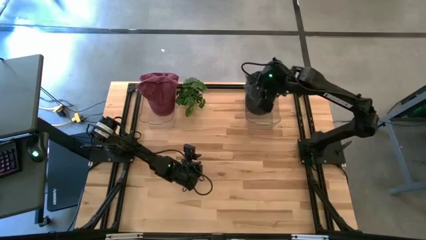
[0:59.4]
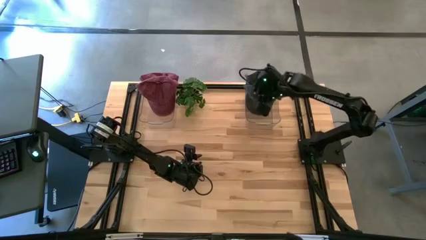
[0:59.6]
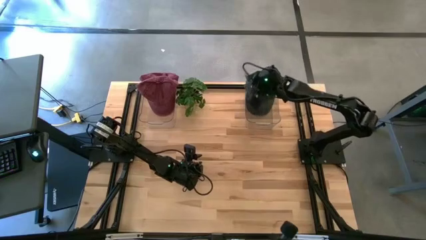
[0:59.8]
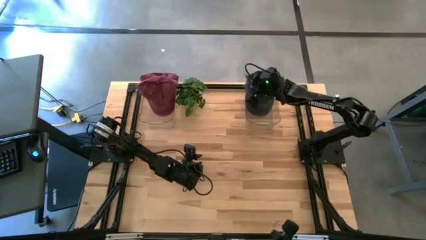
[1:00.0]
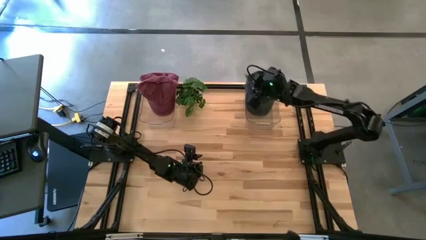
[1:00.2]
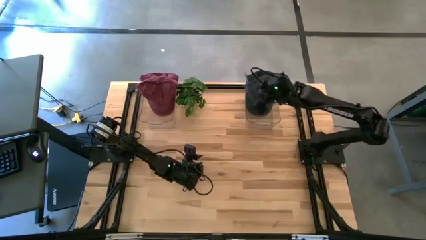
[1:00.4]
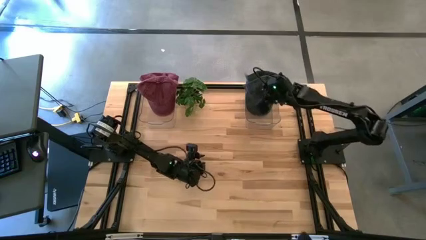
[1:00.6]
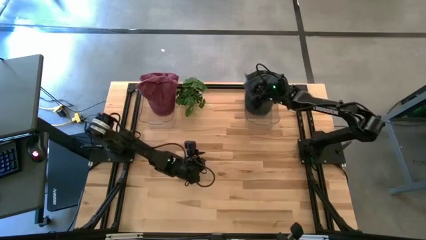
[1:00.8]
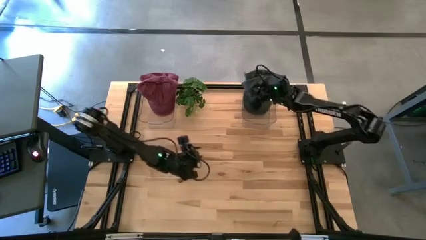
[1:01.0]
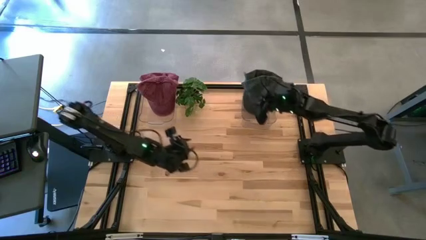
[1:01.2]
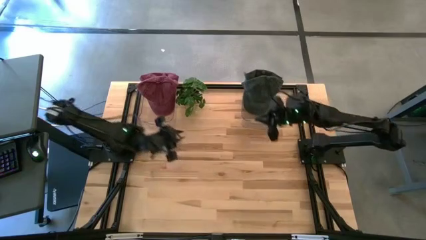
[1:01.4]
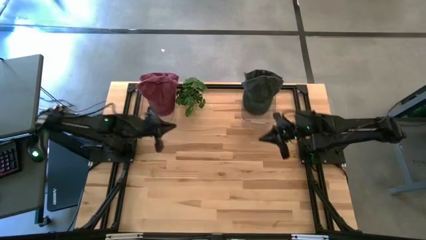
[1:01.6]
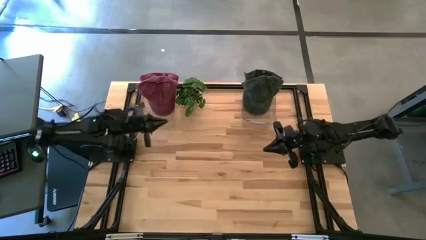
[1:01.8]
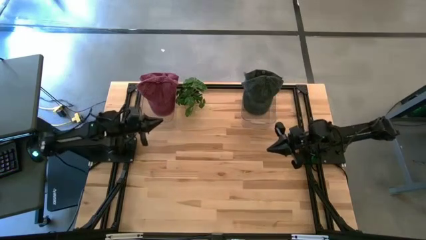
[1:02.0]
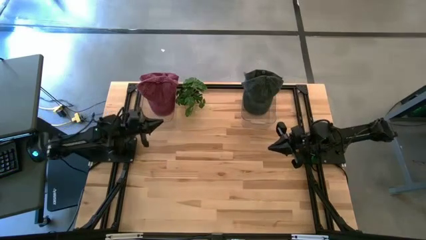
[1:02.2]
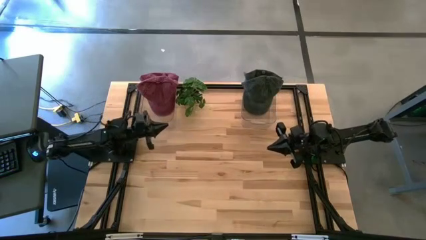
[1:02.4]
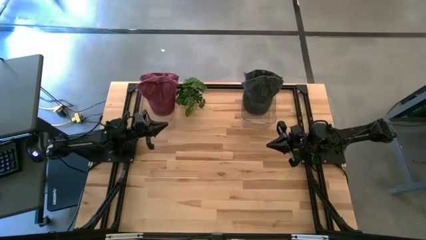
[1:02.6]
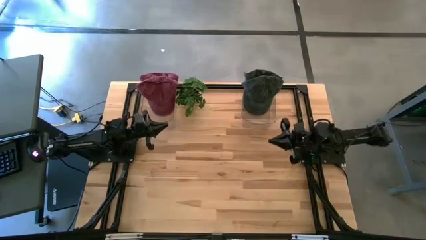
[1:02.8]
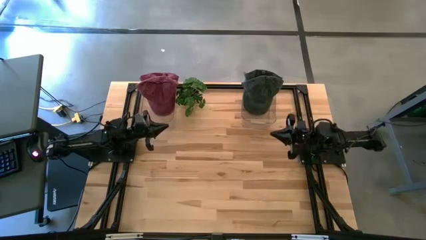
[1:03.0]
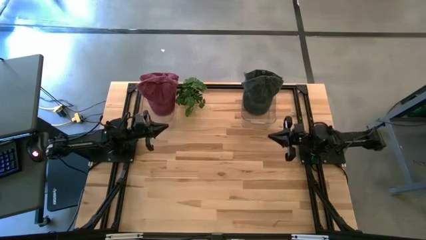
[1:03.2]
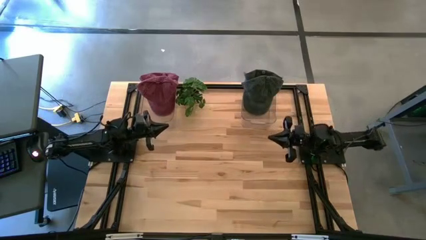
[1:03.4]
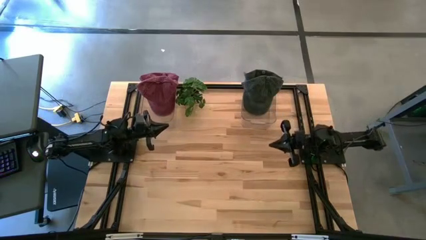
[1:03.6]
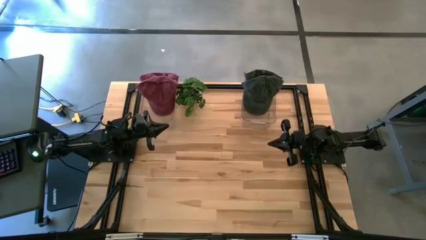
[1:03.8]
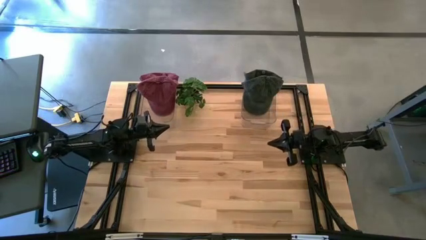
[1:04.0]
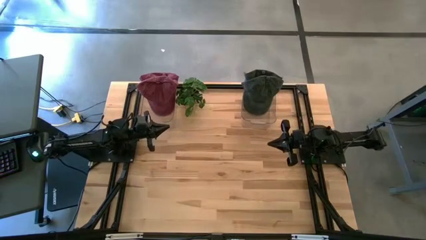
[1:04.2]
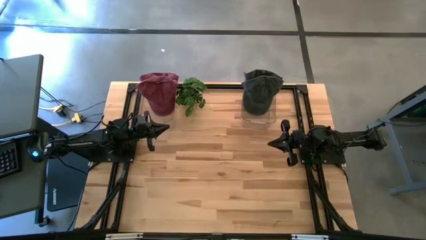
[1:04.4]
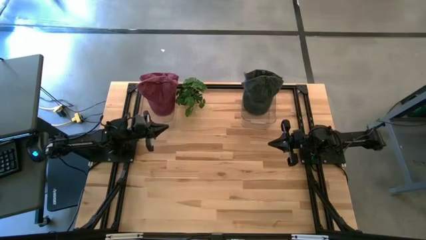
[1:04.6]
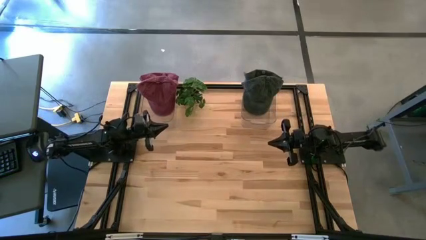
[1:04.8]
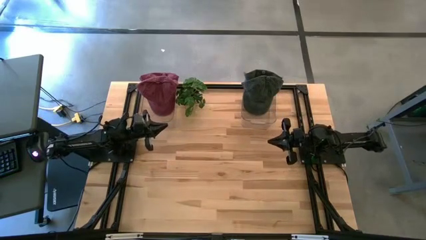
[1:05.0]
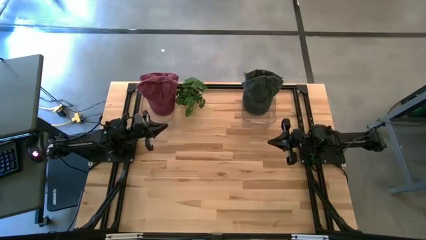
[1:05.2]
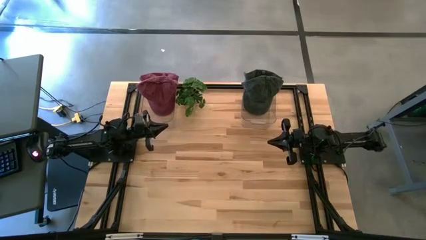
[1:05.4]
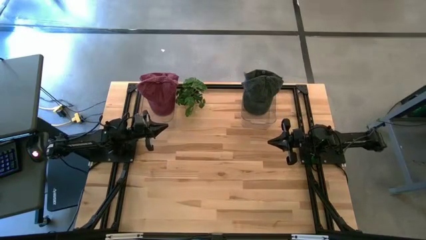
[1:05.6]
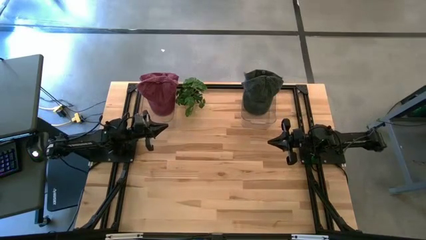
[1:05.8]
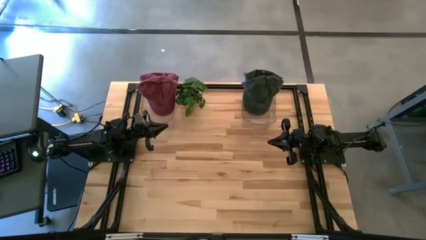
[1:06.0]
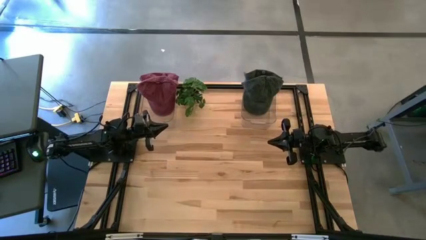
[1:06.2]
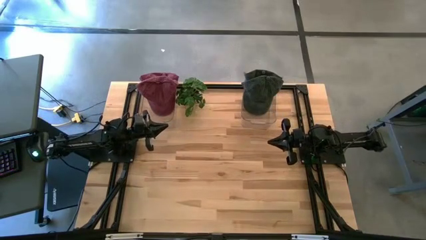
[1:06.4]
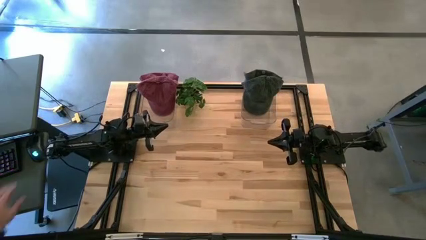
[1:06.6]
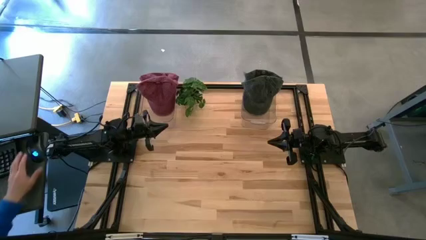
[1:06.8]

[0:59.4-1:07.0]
Task: Pick & Place hat
Return to home position

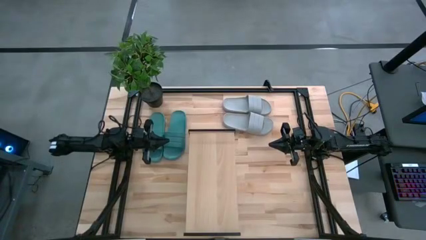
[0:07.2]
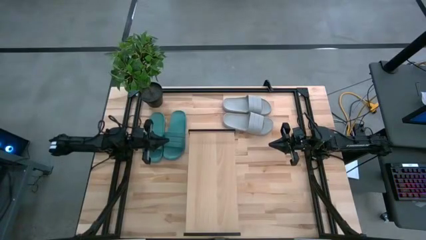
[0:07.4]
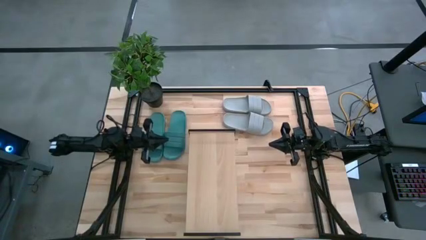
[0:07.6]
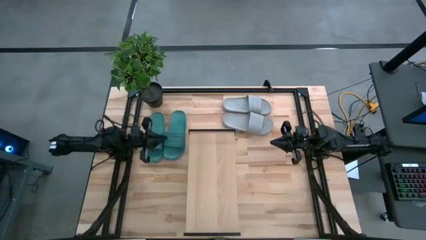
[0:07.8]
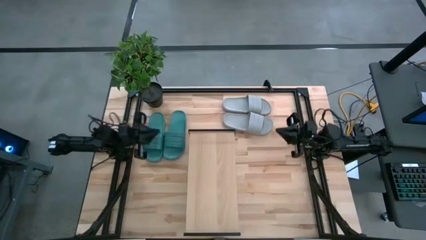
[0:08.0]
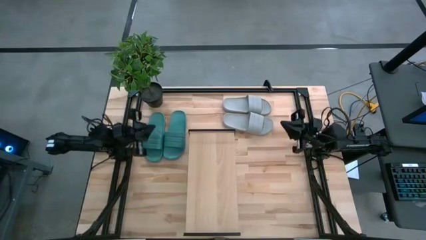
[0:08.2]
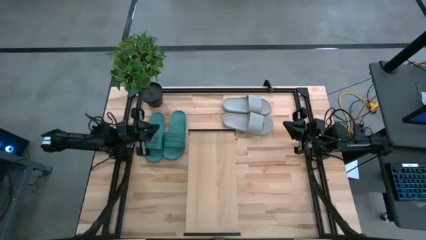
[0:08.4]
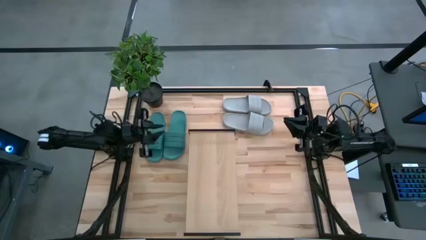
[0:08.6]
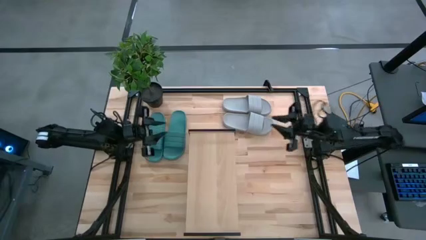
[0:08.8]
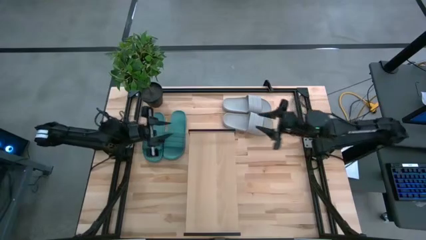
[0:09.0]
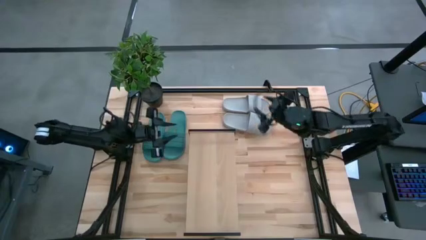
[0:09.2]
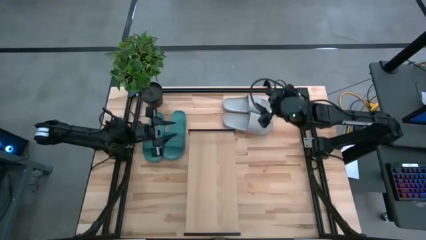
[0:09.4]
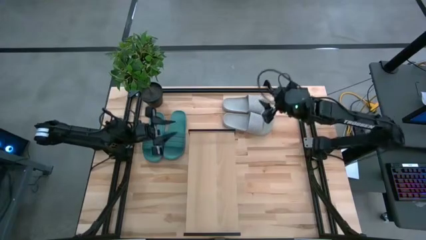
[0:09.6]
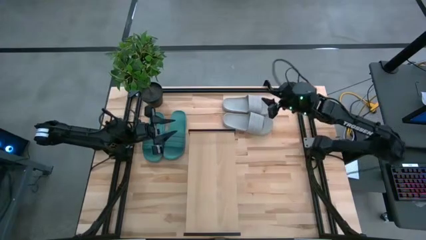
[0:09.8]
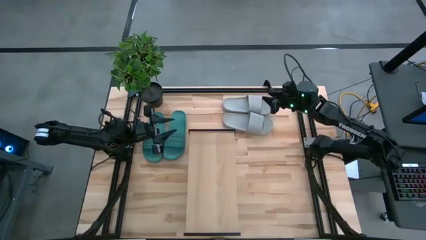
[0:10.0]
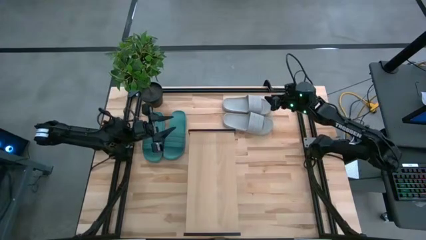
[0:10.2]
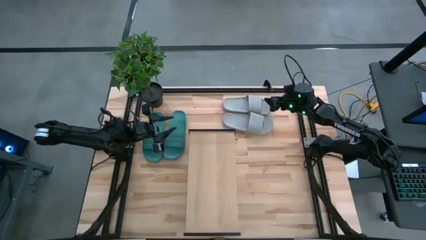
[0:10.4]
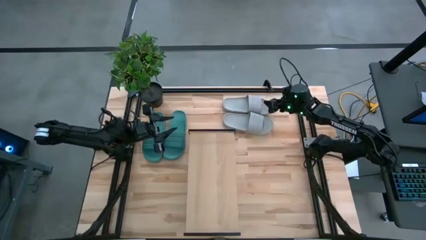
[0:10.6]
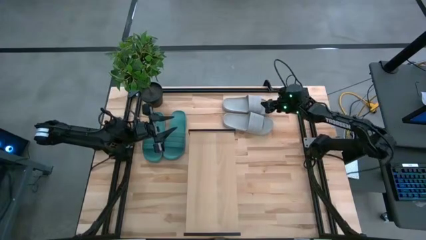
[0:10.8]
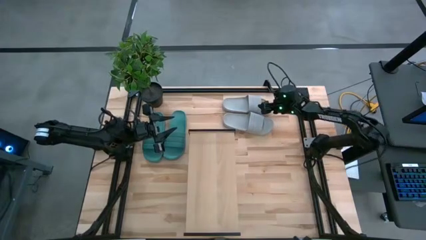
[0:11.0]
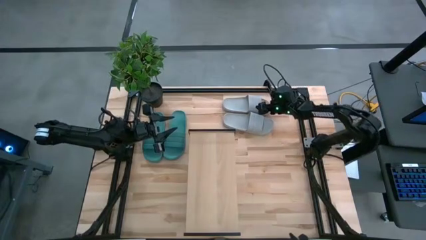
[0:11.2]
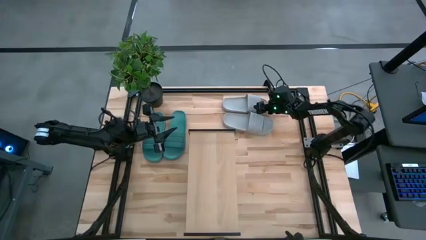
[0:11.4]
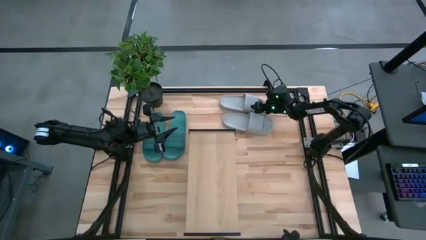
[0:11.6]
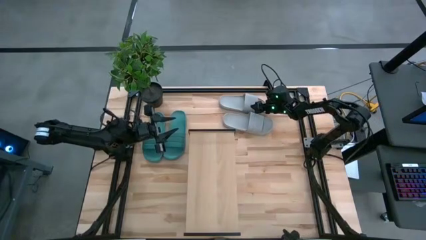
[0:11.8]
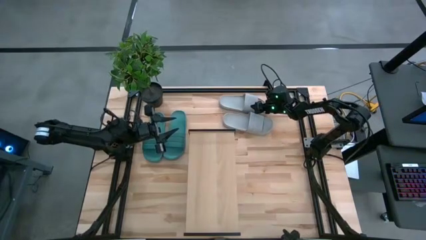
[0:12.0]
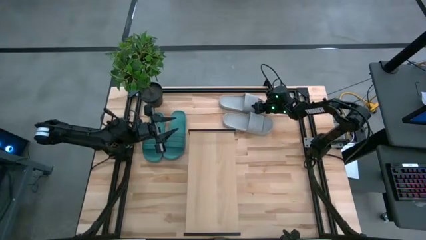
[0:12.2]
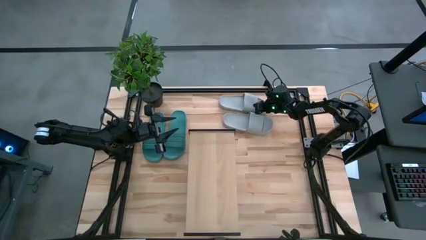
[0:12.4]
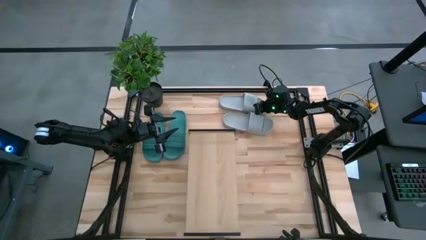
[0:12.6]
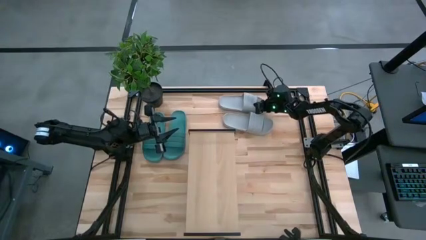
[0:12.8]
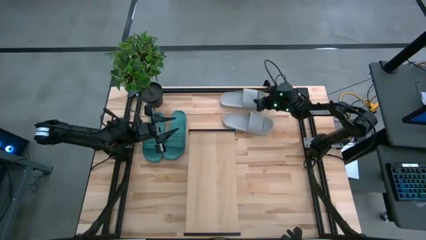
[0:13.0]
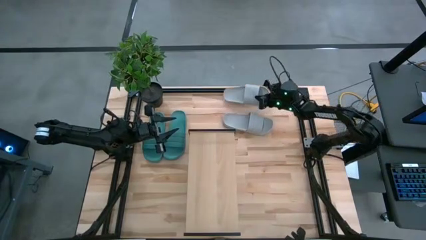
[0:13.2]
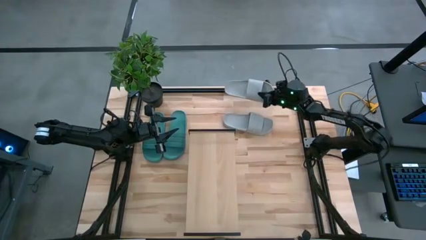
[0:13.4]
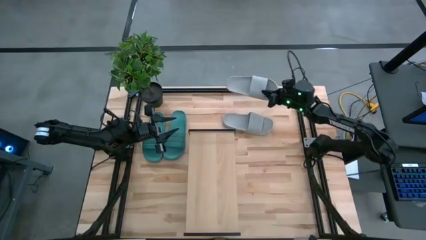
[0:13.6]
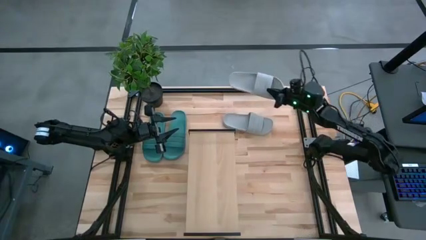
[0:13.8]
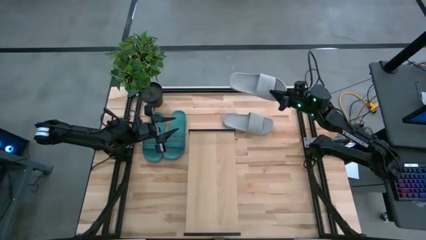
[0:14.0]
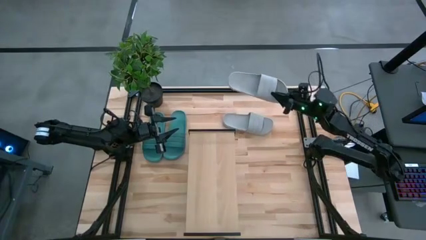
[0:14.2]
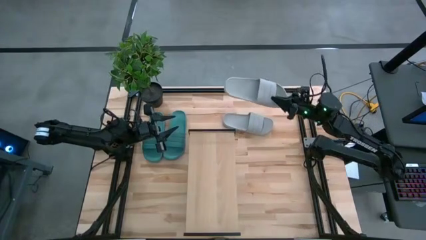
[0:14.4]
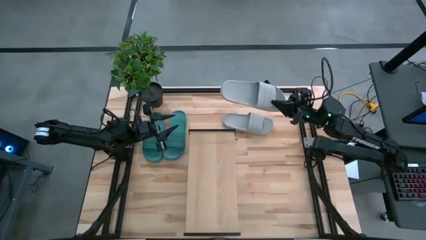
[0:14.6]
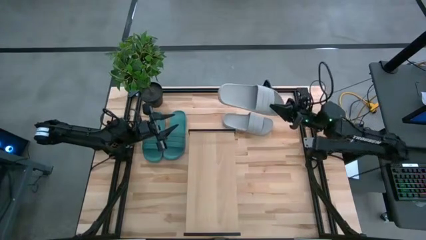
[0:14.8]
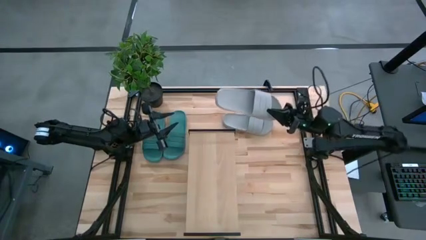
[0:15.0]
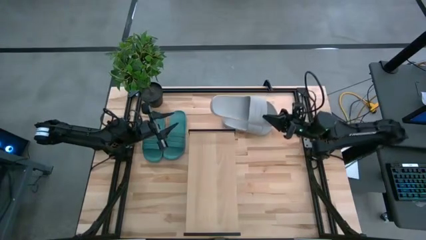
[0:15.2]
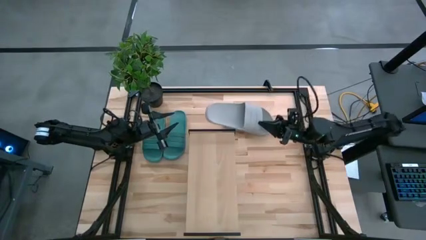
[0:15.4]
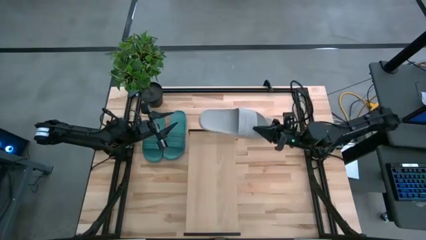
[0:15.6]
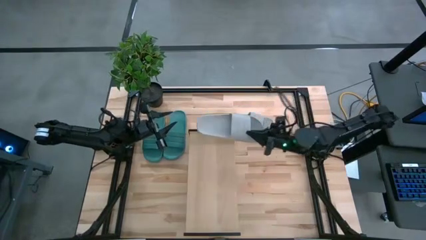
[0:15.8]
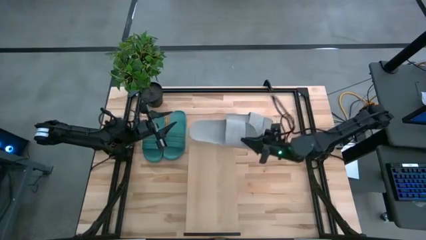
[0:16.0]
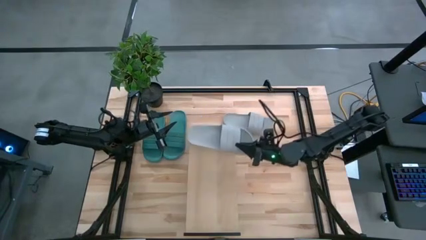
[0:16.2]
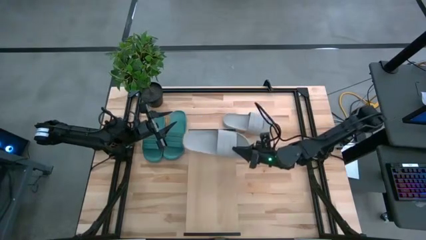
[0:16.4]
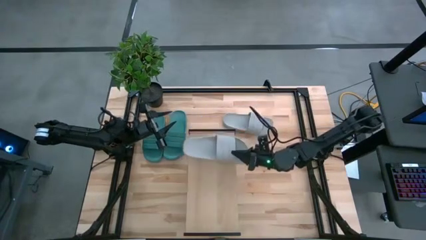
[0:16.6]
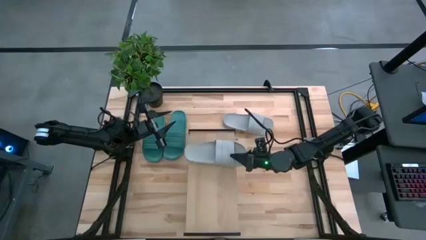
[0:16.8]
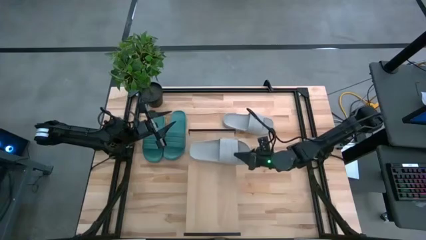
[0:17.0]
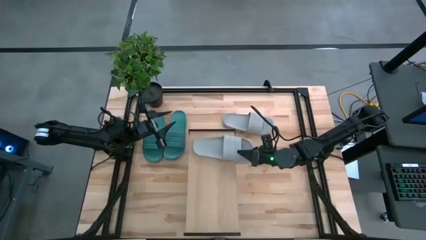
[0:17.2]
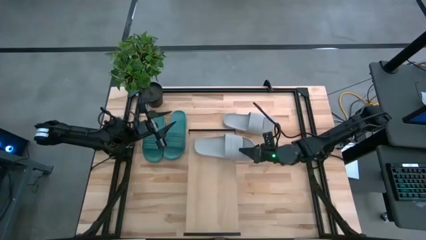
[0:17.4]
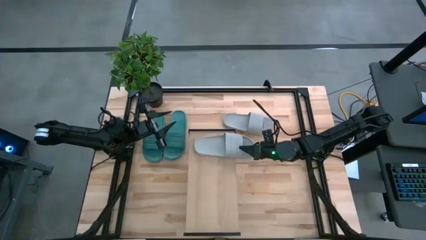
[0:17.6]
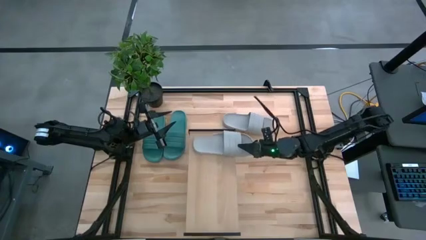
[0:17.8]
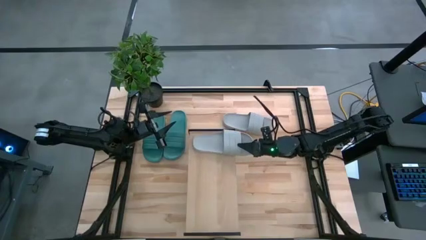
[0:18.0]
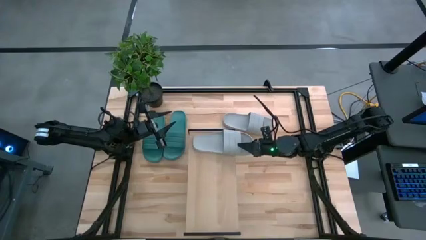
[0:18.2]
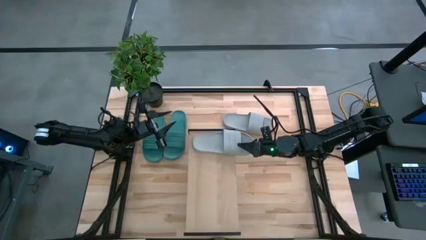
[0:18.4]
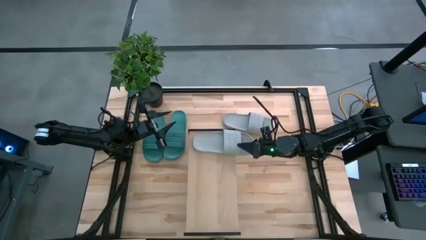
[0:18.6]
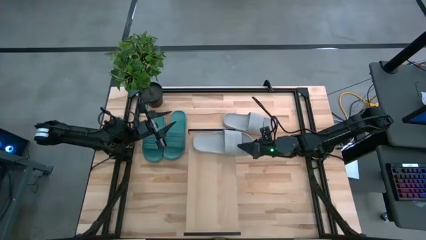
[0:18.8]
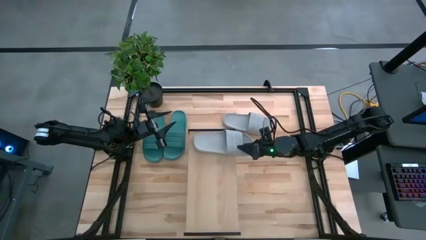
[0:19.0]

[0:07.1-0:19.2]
Task: Pick and place slides into the shelf
Put the top gray slipper on the shelf
